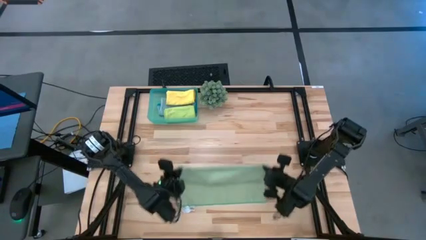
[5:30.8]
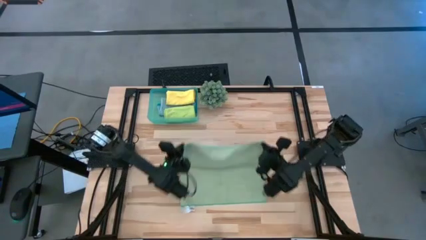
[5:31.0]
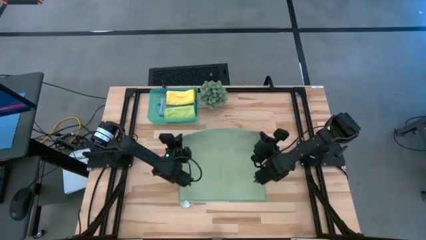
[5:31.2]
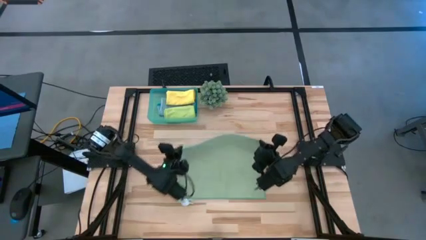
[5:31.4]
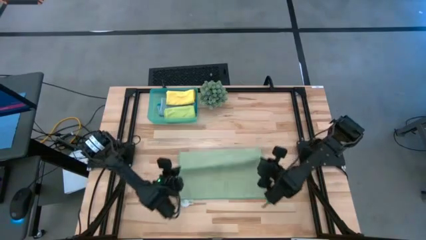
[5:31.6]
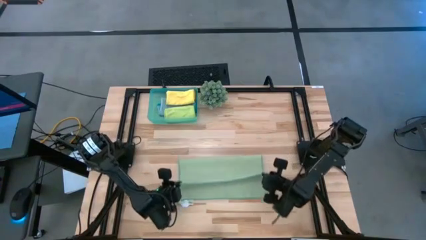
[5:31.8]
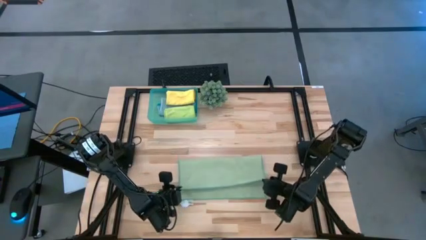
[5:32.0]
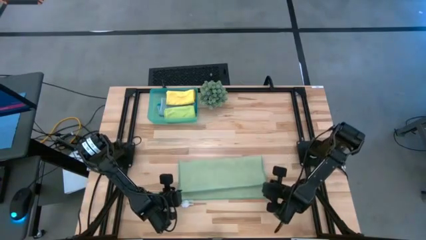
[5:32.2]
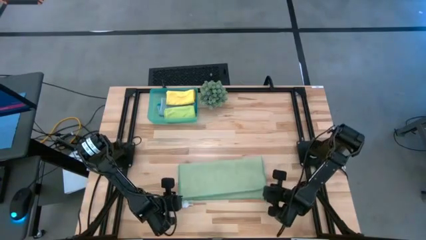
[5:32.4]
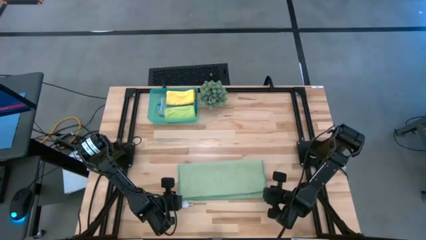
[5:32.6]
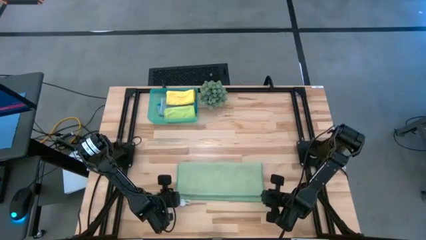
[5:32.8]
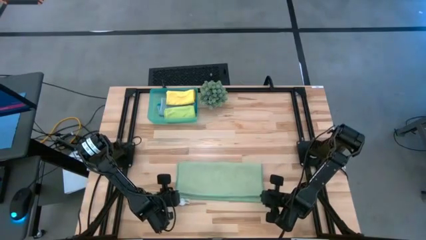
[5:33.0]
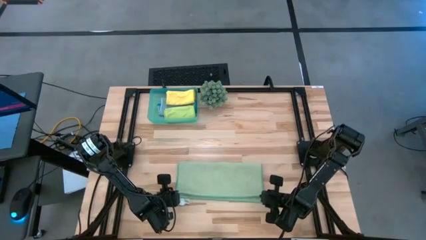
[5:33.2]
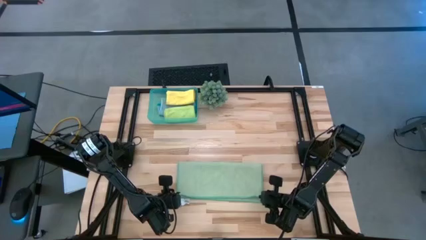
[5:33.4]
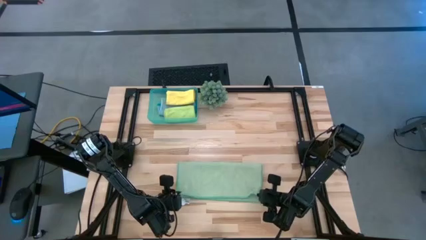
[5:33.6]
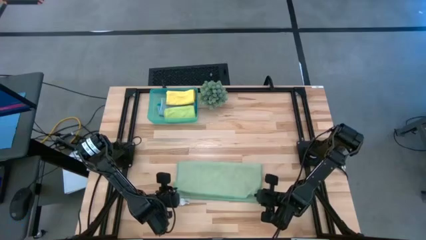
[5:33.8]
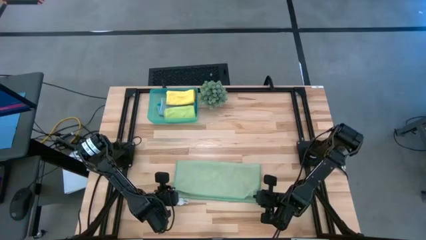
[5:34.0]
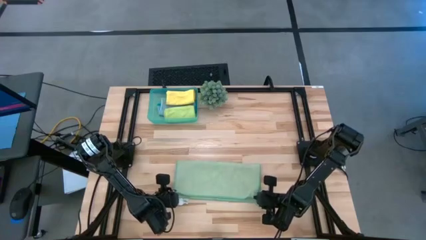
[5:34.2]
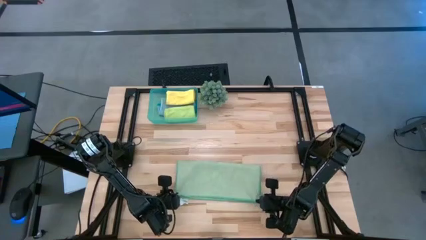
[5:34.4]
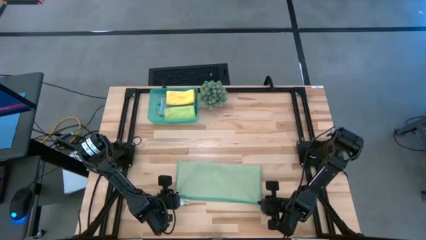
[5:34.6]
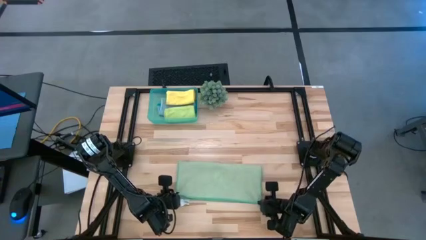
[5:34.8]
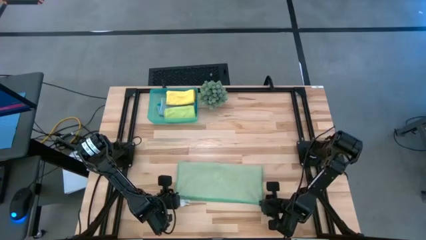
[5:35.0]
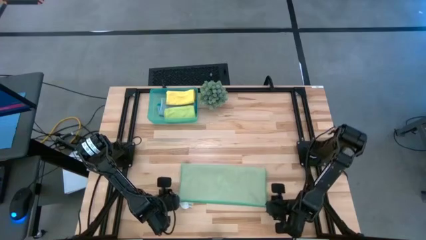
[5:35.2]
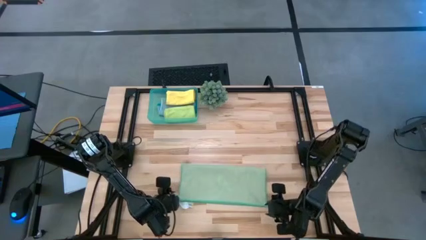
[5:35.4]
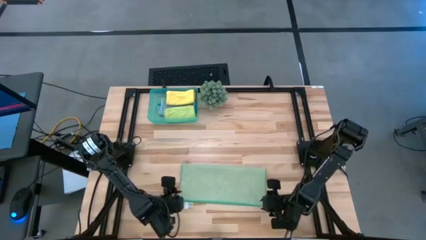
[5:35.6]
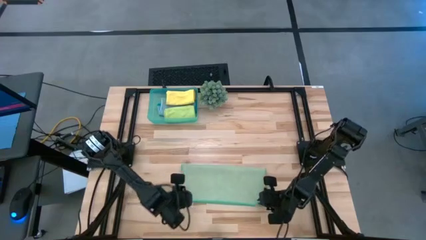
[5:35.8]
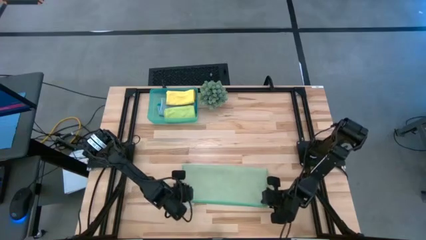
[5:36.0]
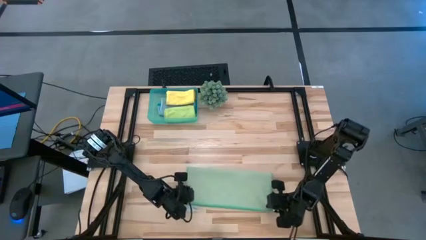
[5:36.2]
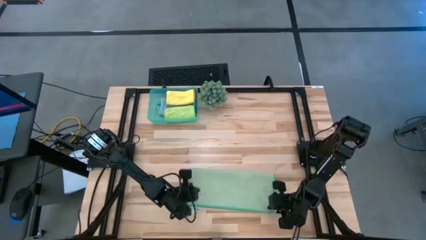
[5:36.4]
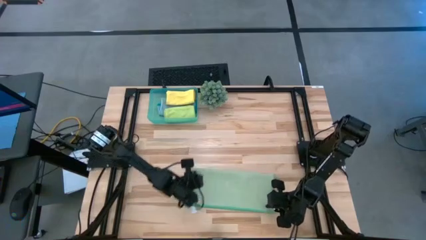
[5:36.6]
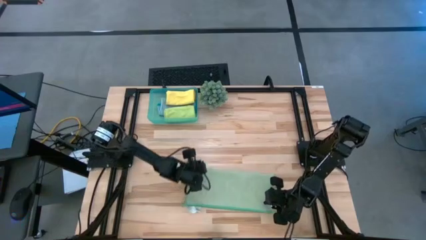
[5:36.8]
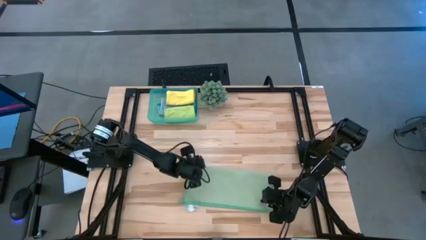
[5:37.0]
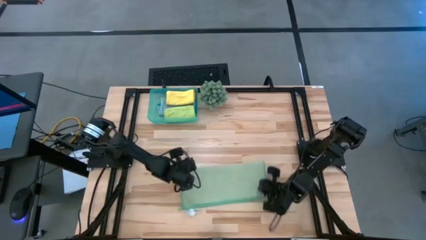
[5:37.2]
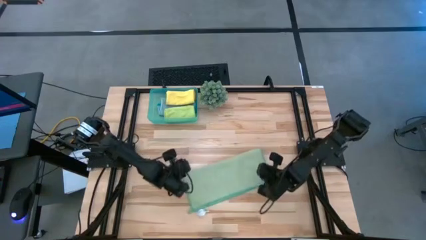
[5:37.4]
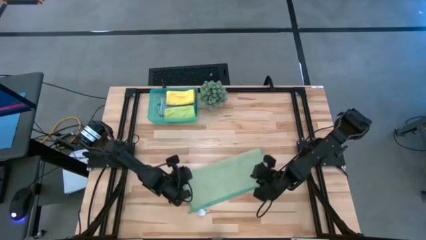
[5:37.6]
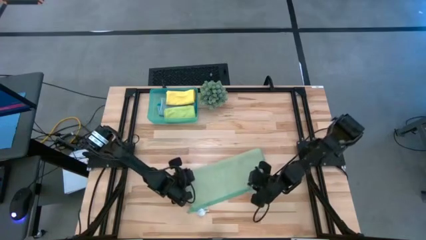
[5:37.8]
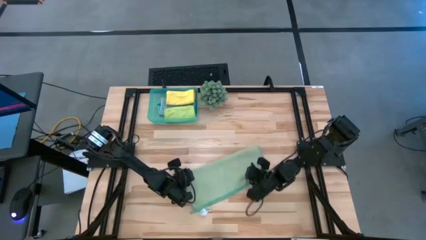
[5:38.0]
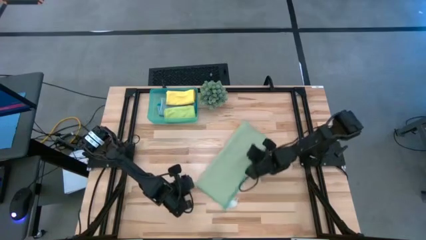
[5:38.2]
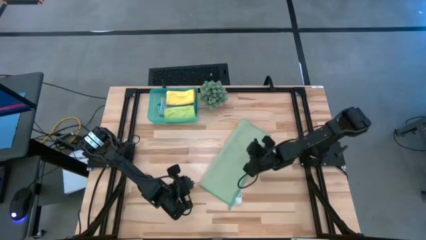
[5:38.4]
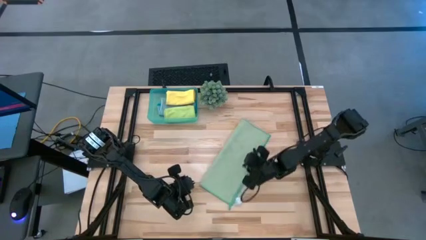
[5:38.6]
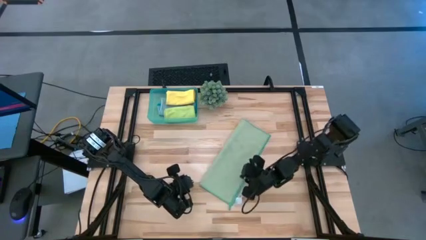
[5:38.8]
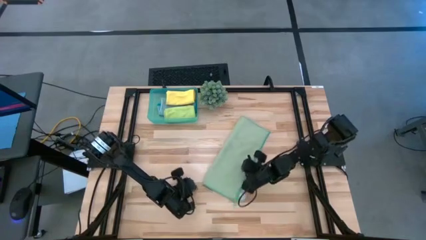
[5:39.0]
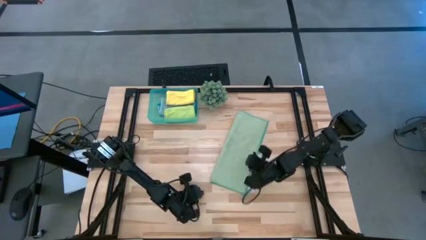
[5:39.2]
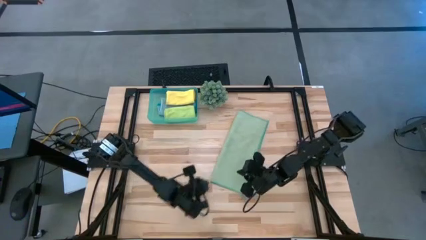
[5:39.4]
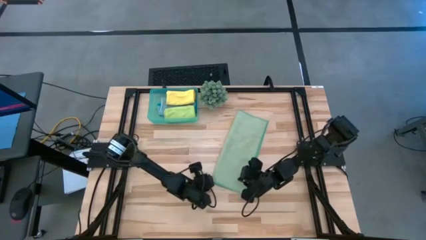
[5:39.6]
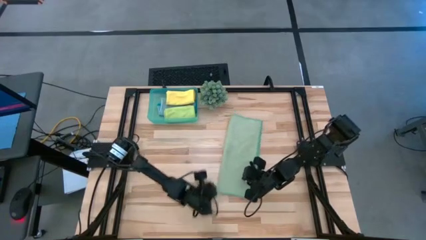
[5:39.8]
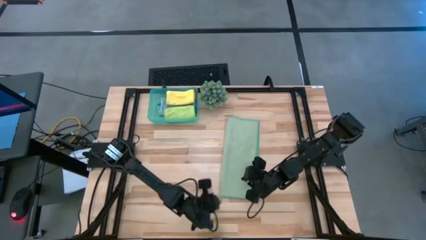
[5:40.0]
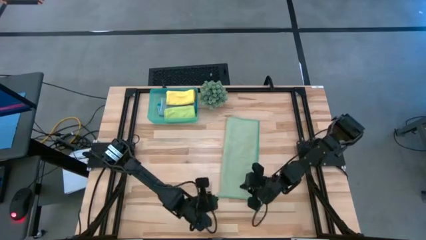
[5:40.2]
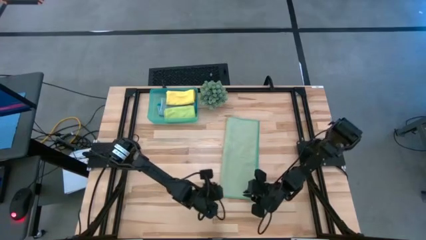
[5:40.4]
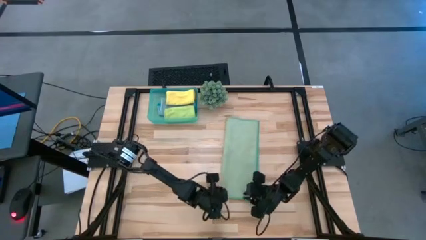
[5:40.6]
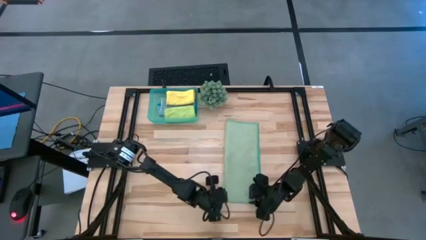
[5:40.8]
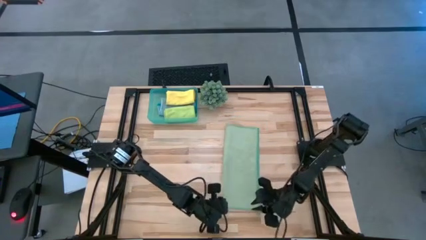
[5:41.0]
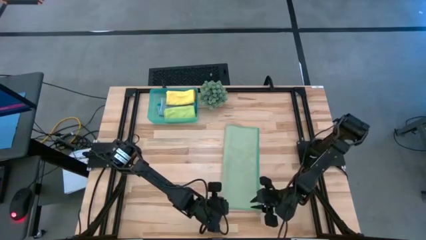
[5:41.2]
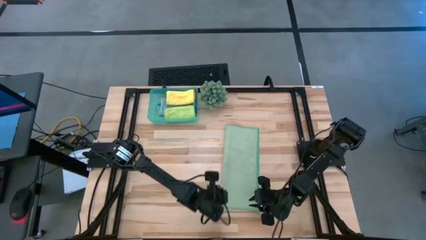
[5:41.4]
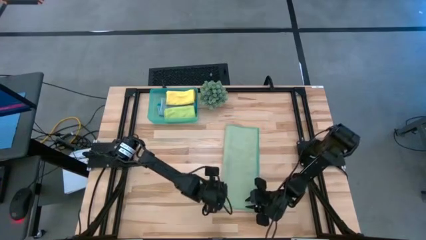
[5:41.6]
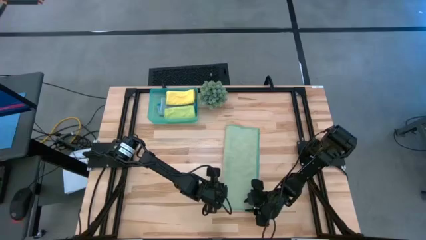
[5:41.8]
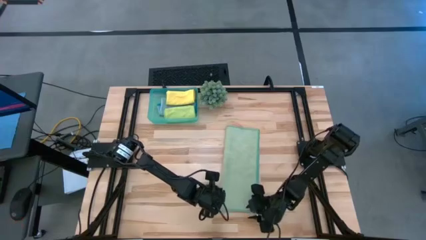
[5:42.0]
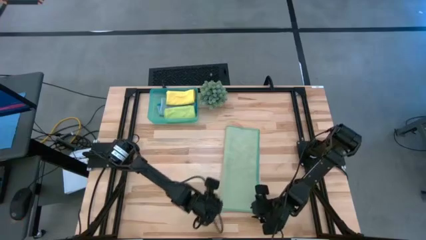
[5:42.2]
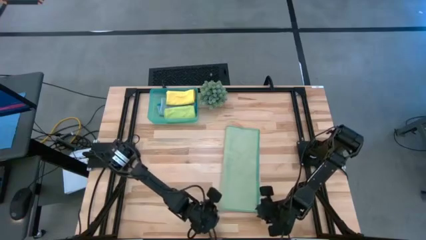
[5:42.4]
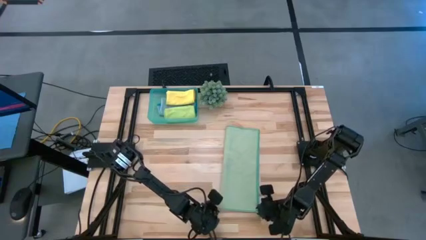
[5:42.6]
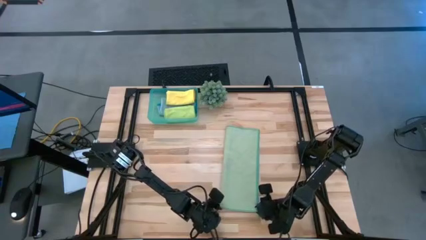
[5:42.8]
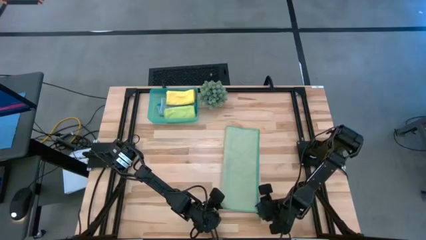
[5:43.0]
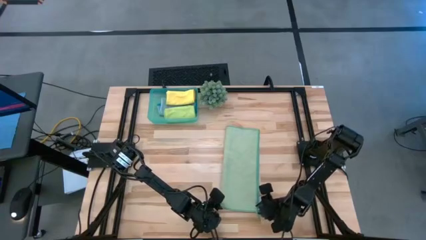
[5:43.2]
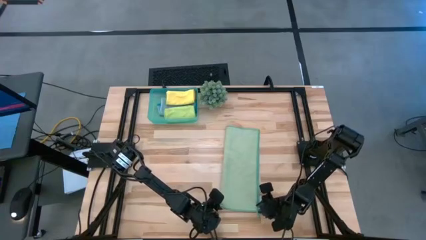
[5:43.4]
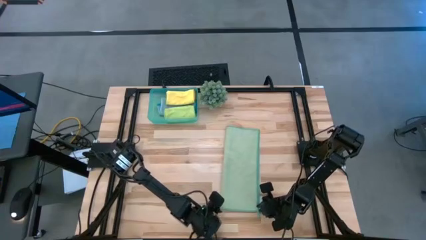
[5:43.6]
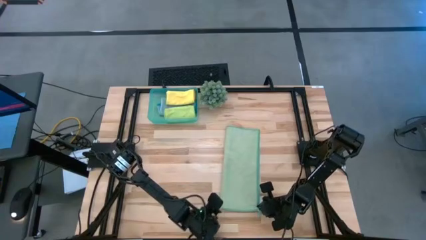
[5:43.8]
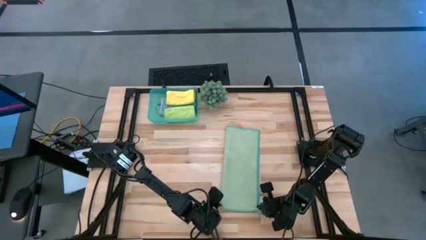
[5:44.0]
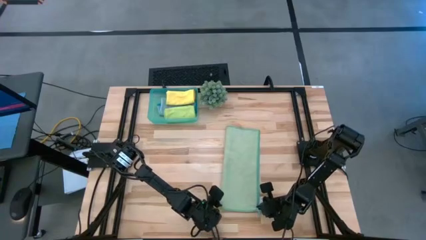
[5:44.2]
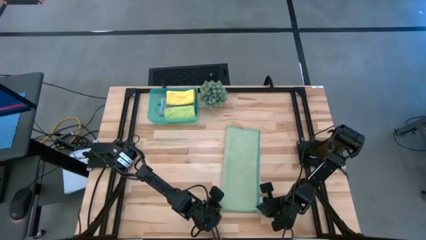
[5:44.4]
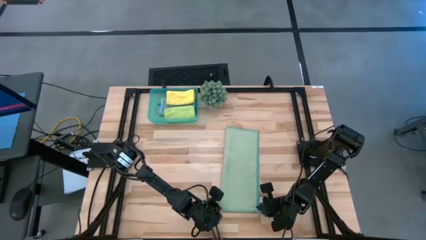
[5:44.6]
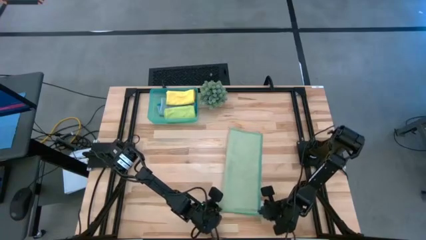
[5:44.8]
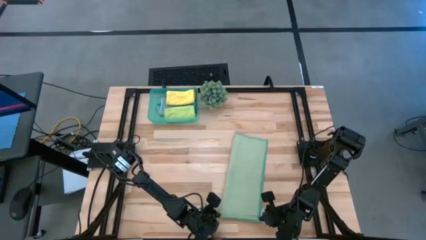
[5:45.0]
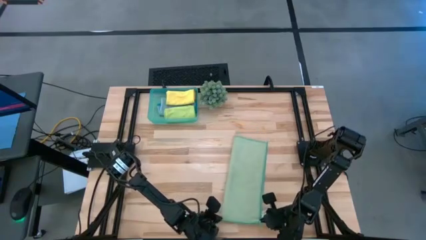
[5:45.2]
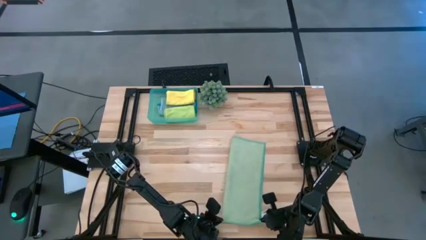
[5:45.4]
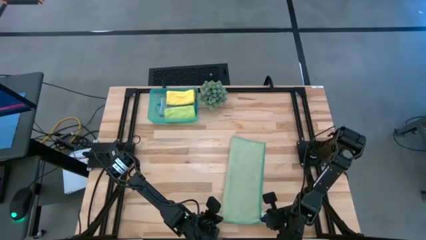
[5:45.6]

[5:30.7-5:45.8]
Task: Fold microfiber towels
Fold the green microfiber cloth
